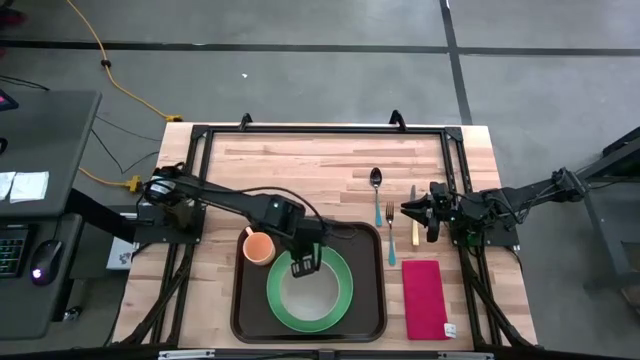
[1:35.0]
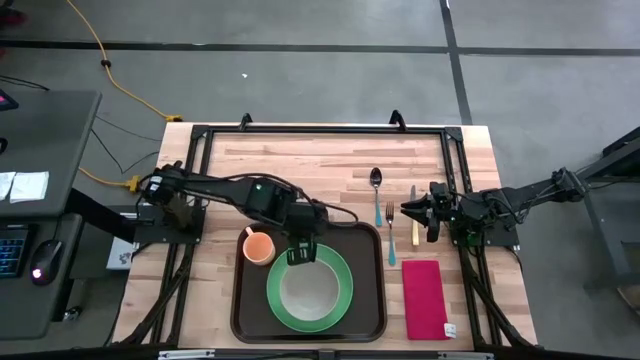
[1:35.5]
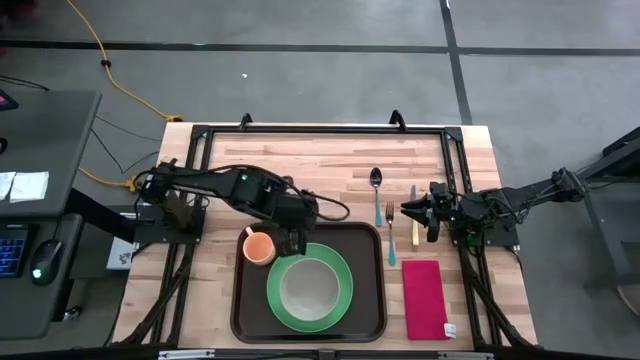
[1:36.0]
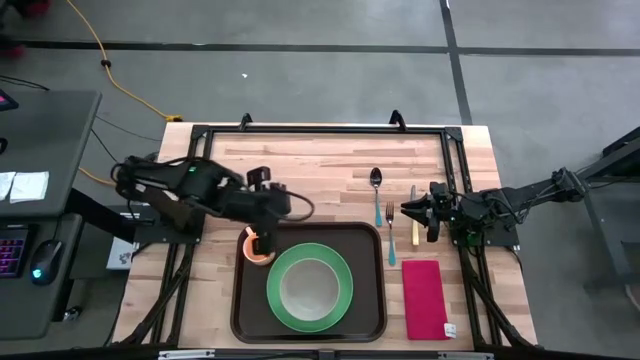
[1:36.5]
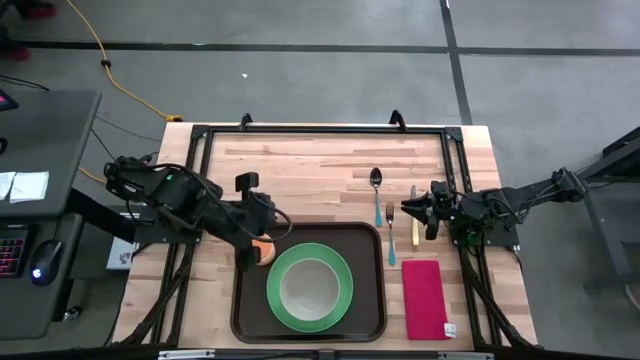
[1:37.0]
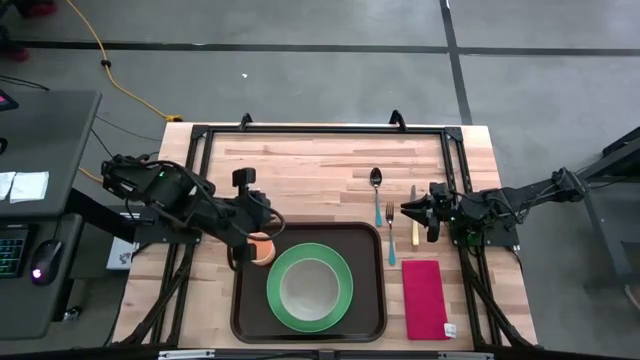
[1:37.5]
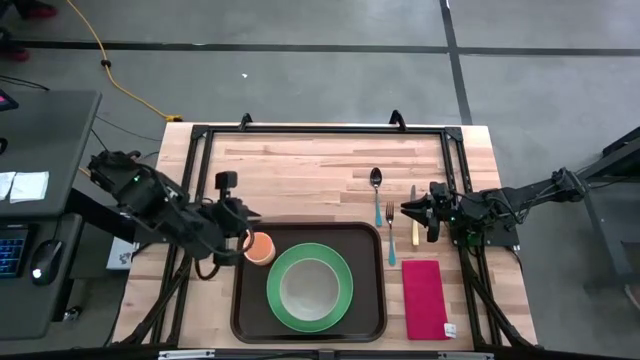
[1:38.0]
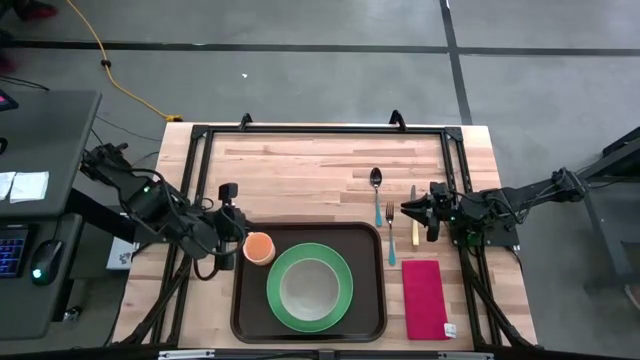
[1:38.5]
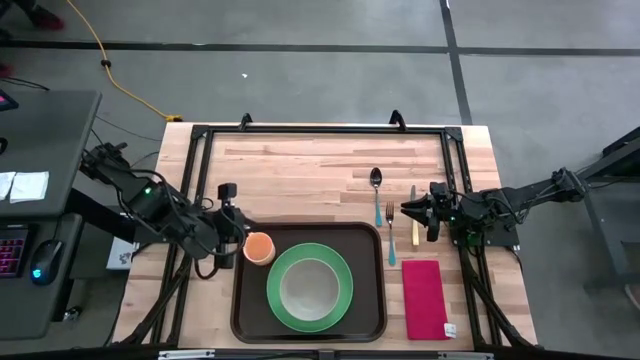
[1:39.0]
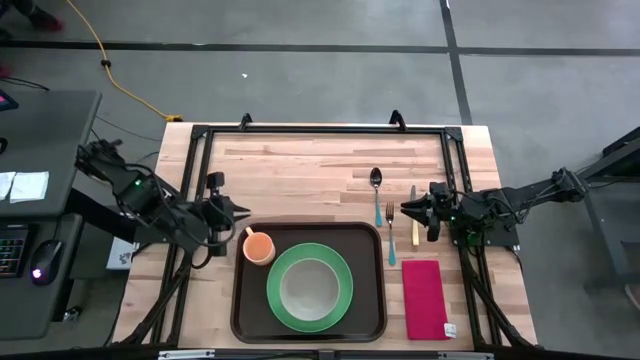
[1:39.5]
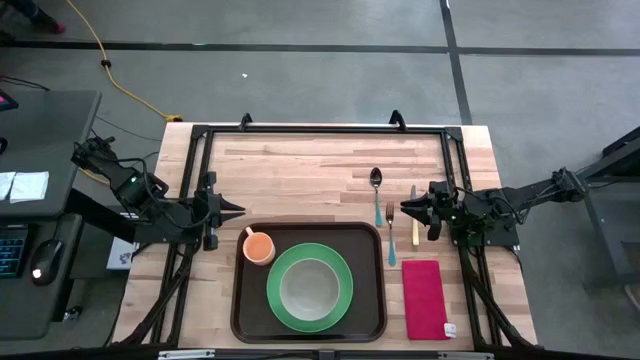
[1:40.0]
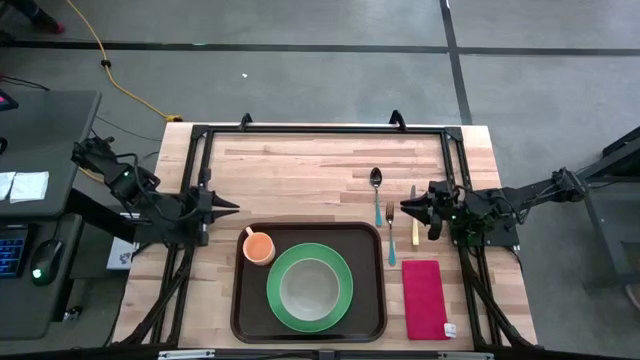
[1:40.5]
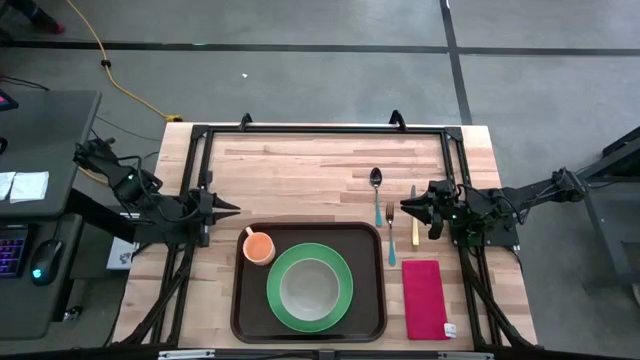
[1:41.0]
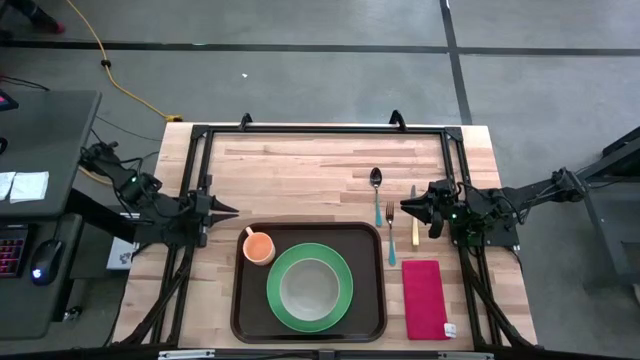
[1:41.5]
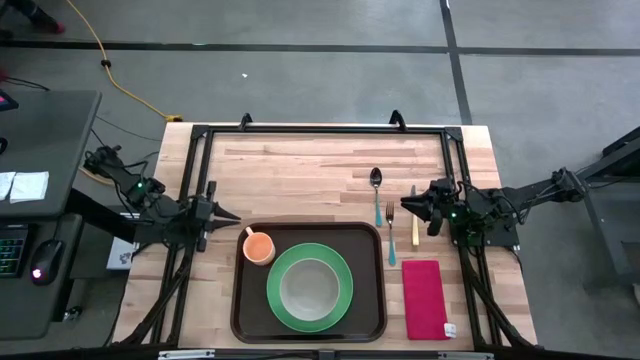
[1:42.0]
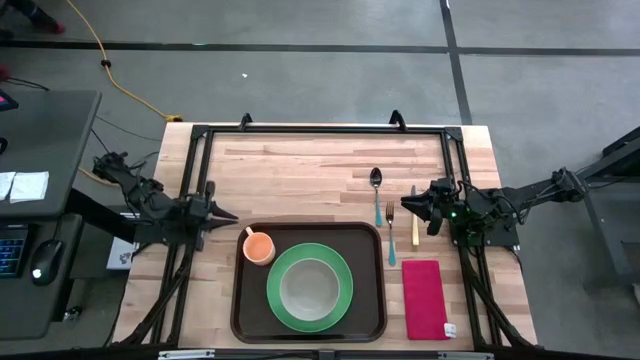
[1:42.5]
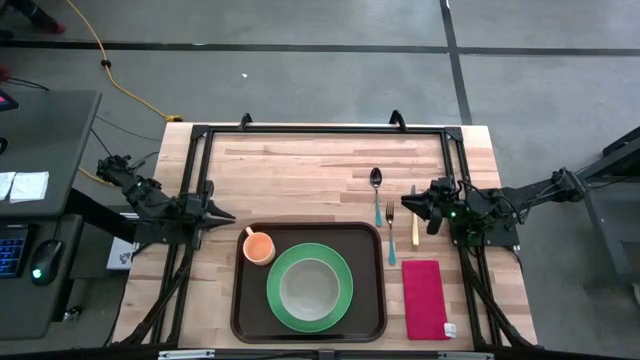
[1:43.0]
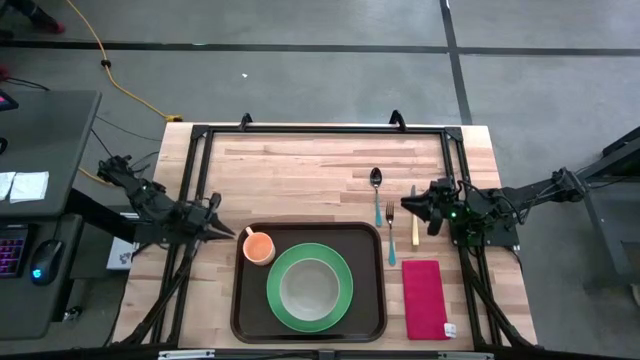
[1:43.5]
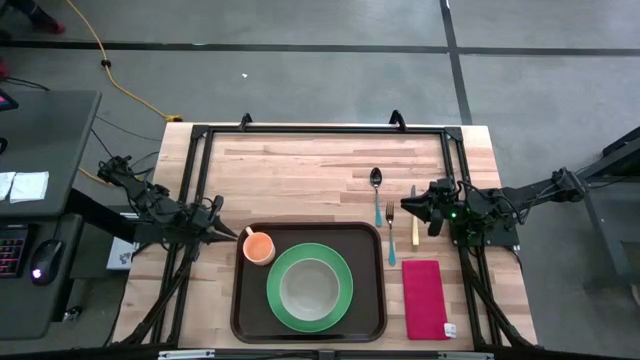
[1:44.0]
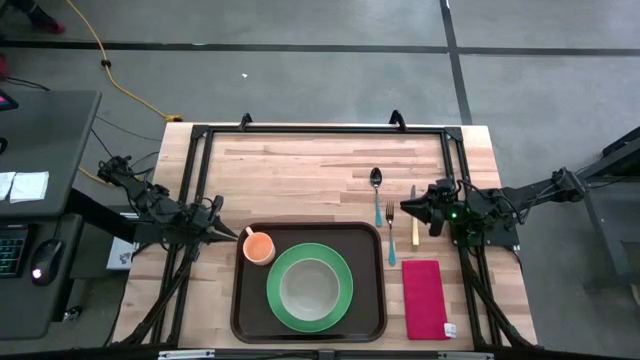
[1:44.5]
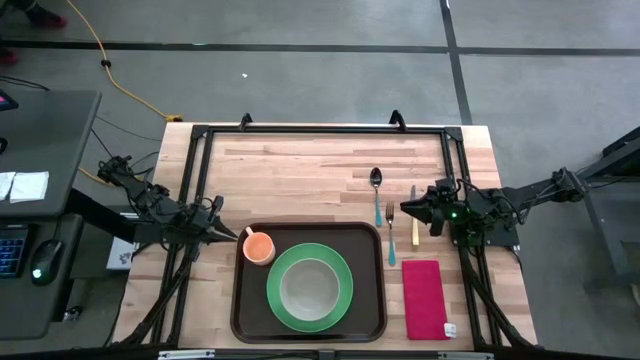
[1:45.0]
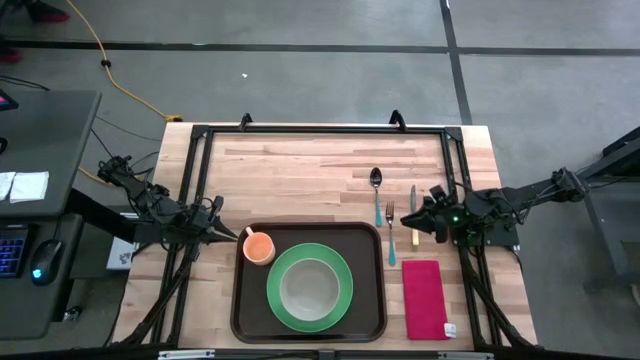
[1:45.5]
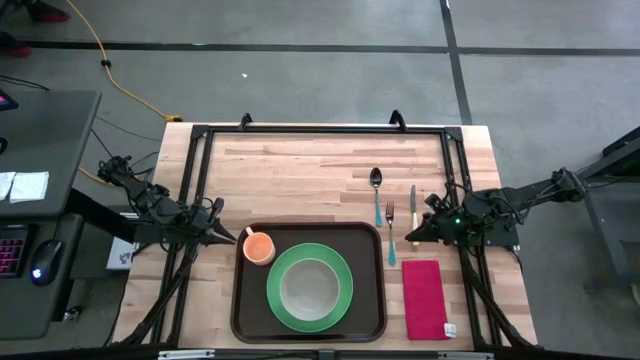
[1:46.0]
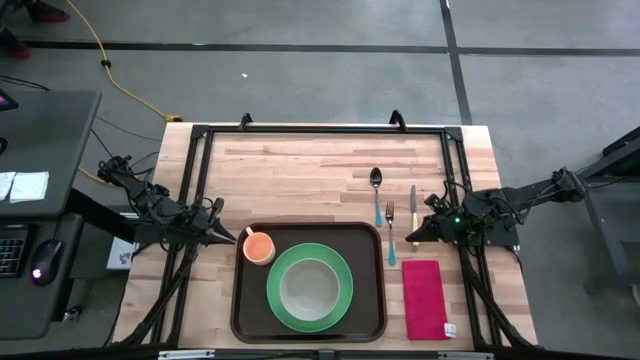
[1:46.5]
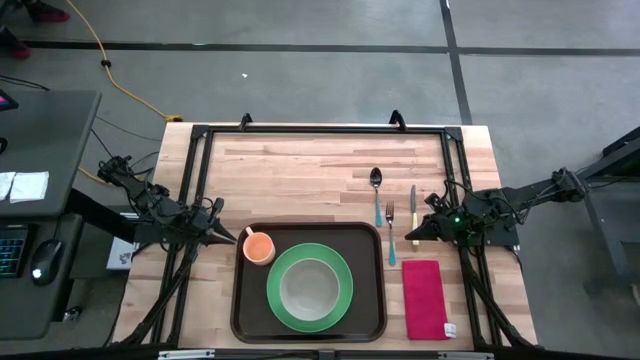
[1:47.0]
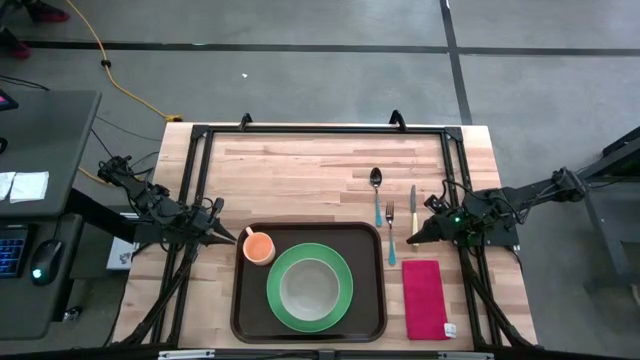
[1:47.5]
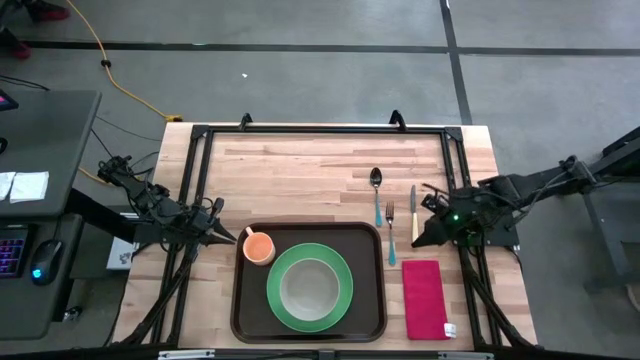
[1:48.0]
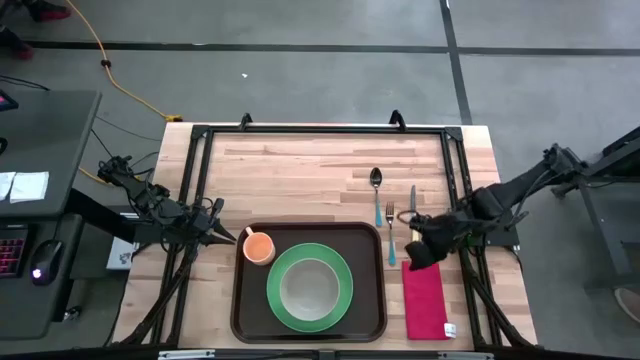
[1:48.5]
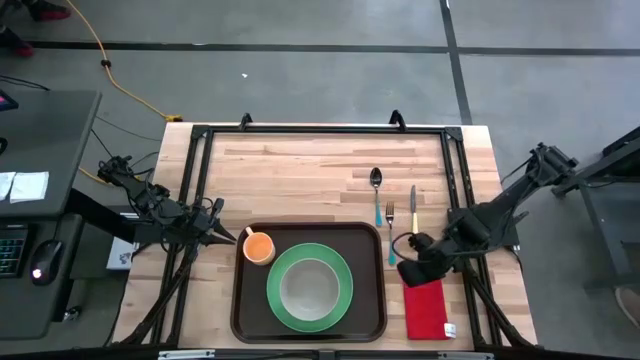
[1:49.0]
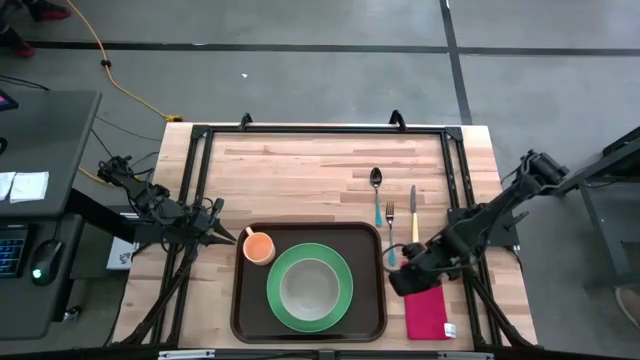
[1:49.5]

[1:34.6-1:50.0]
Task: Set up tray
Put the red table napkin to the right of the green plate on the brown serving tray

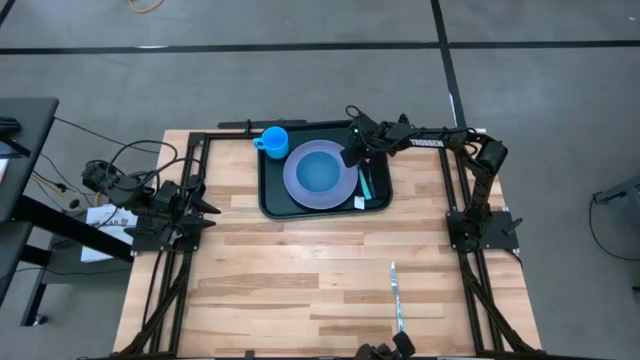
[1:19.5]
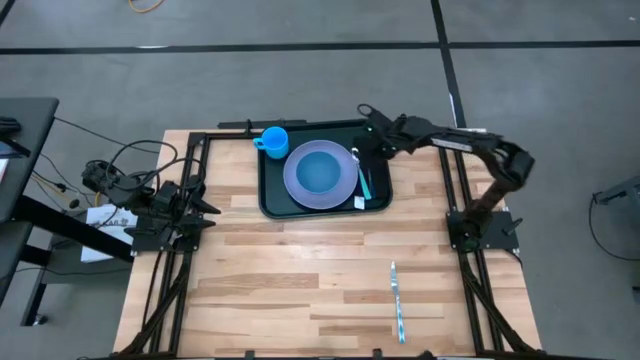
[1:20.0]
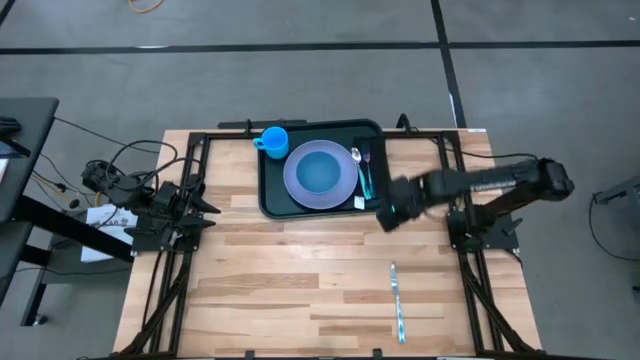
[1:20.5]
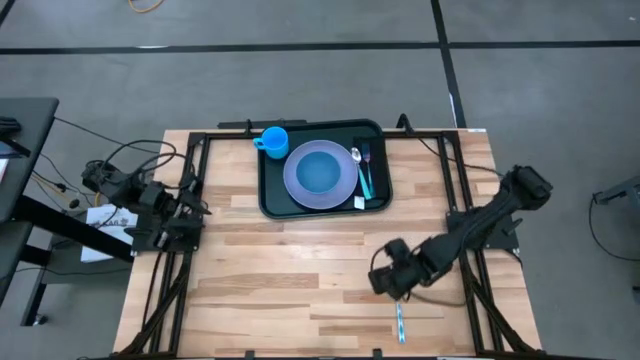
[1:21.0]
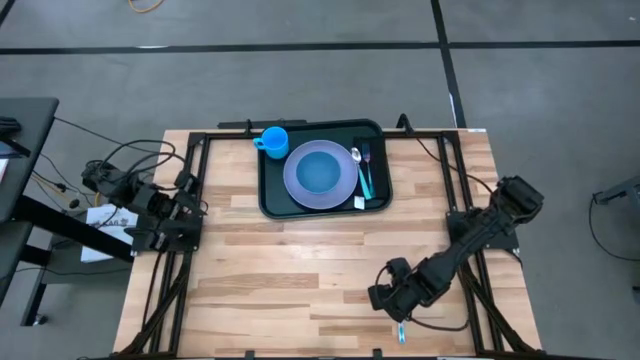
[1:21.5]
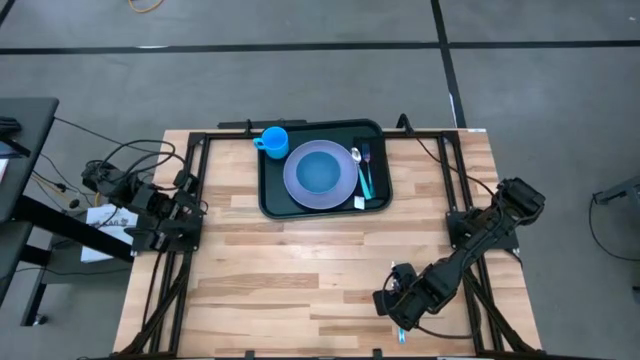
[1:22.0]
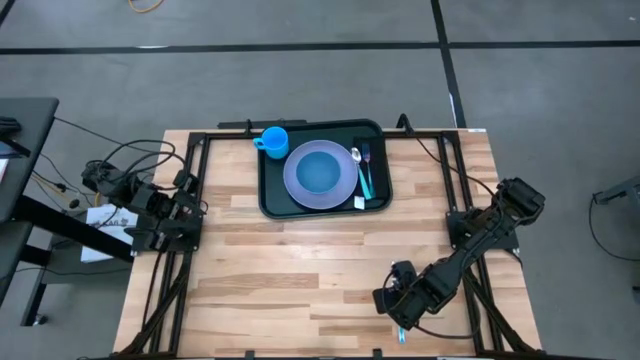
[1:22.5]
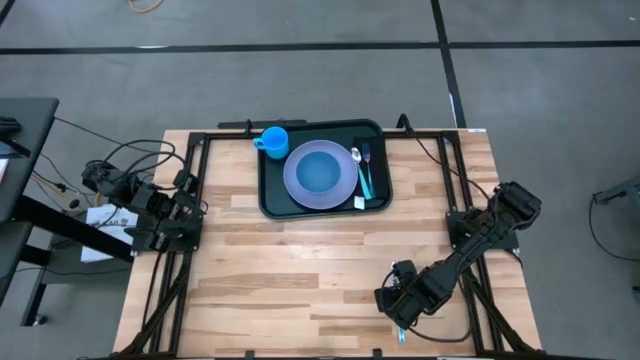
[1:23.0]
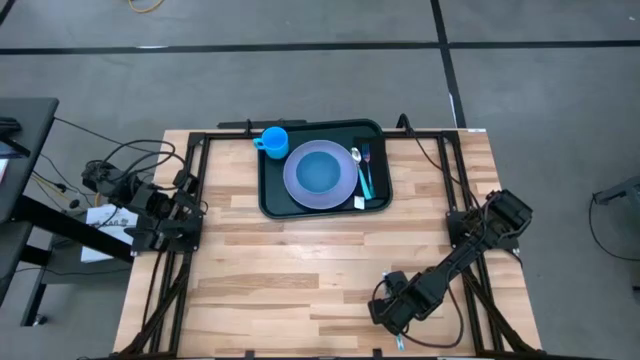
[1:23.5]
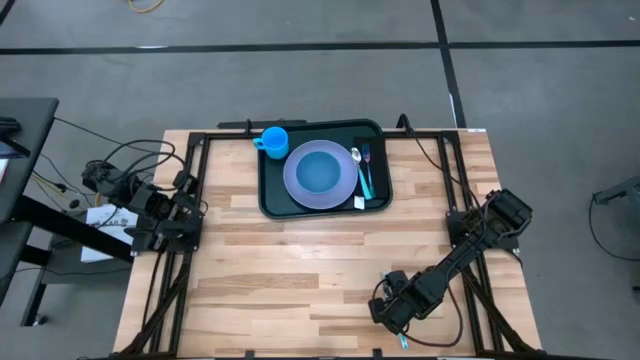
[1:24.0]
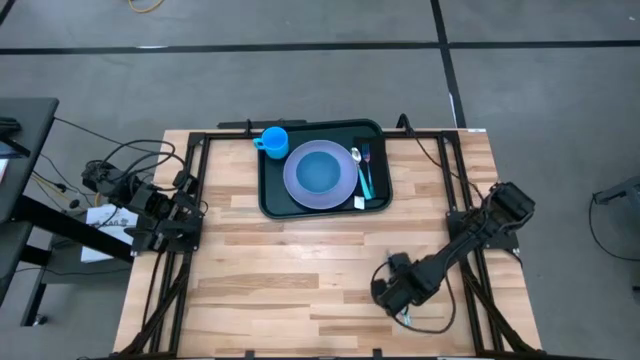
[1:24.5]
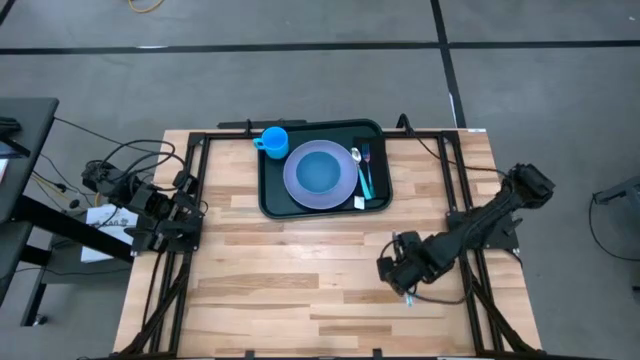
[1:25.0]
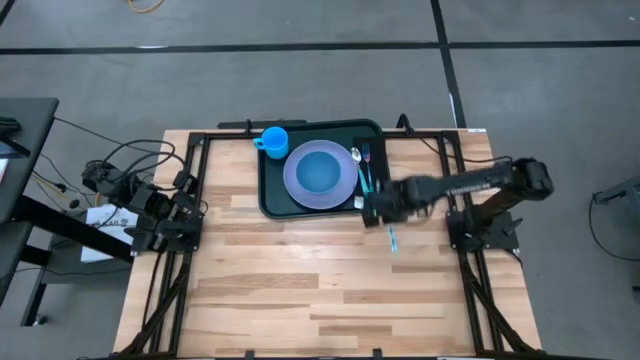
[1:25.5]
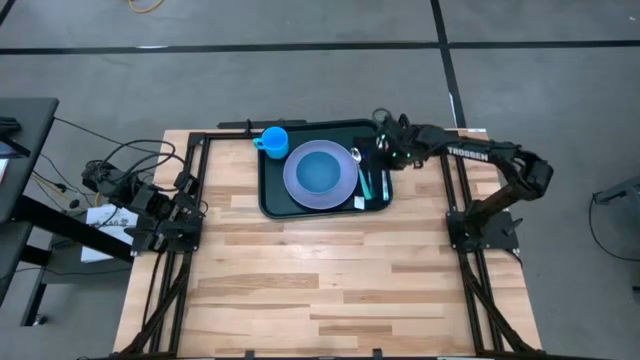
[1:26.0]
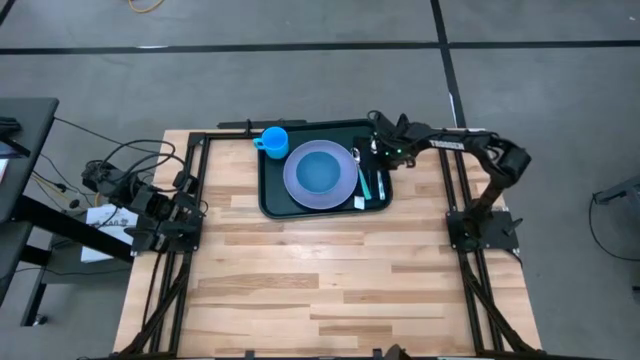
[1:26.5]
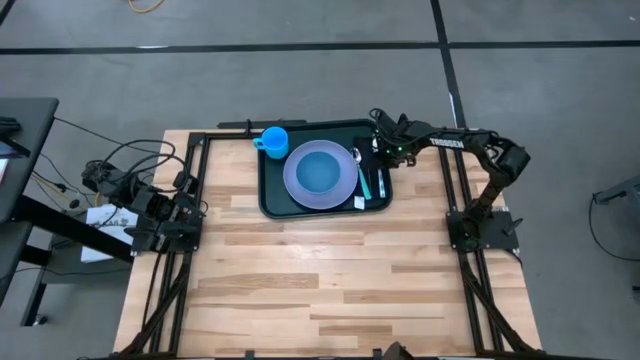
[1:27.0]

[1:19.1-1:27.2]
Task: Set up tray
Put the white patterned knife on the black napkin to the right of the blue fork
